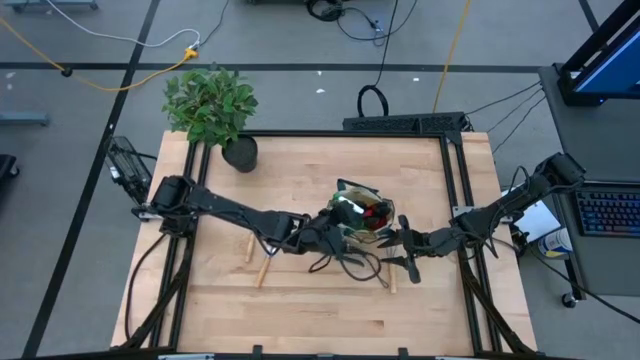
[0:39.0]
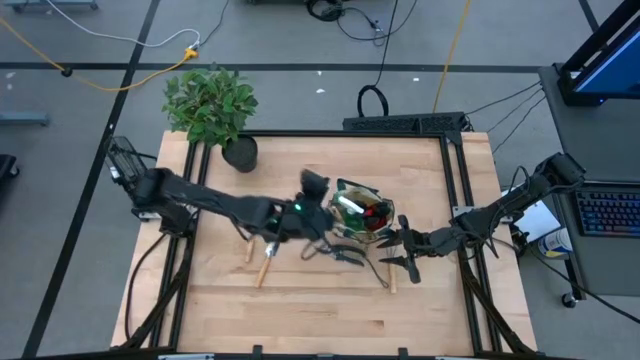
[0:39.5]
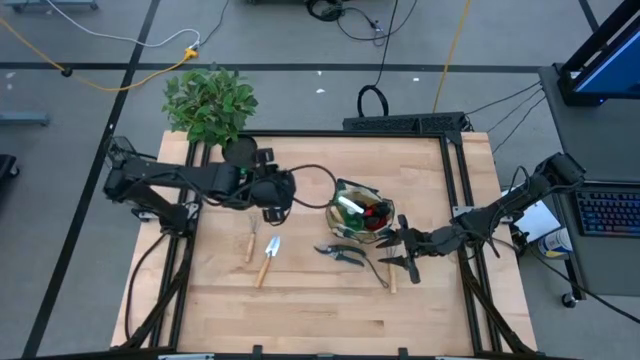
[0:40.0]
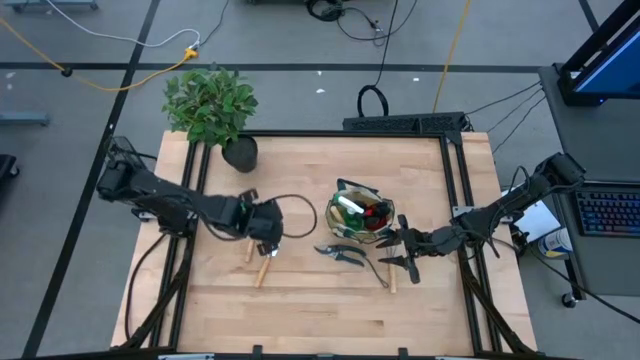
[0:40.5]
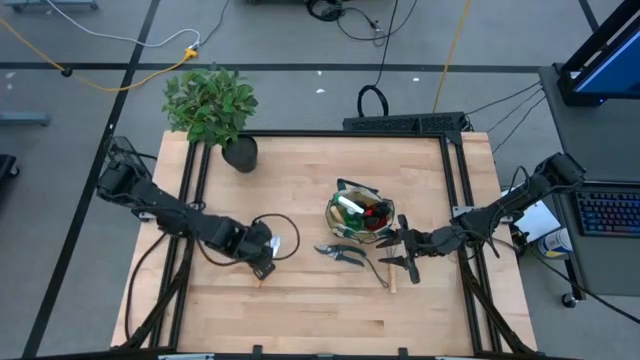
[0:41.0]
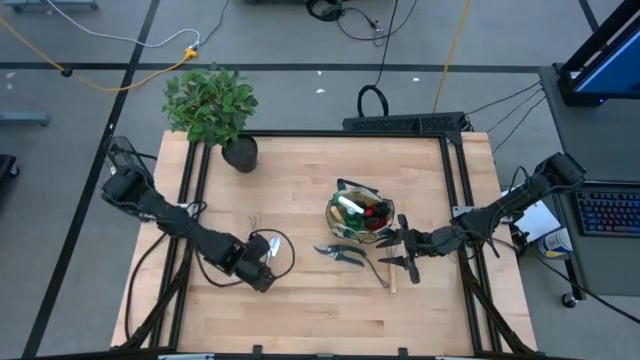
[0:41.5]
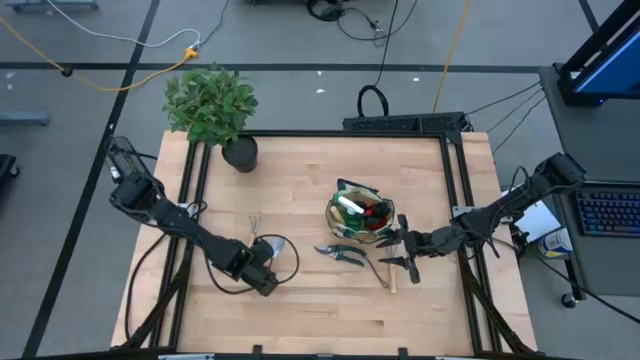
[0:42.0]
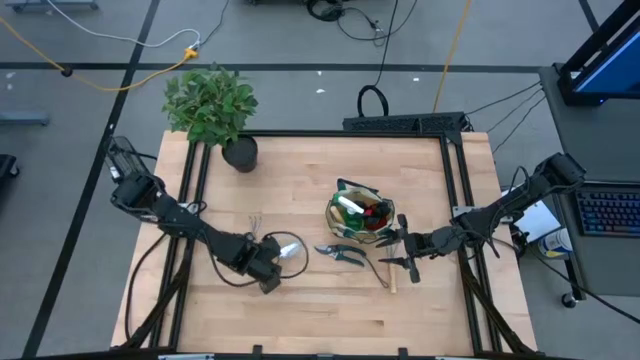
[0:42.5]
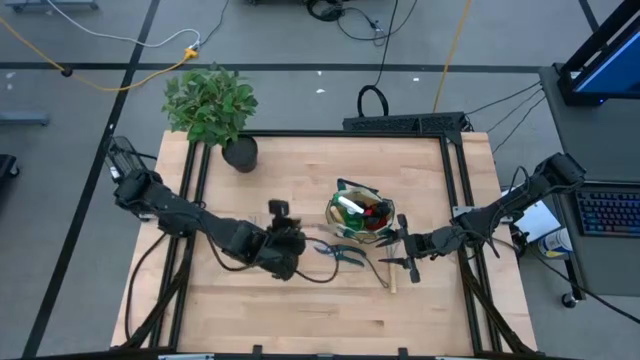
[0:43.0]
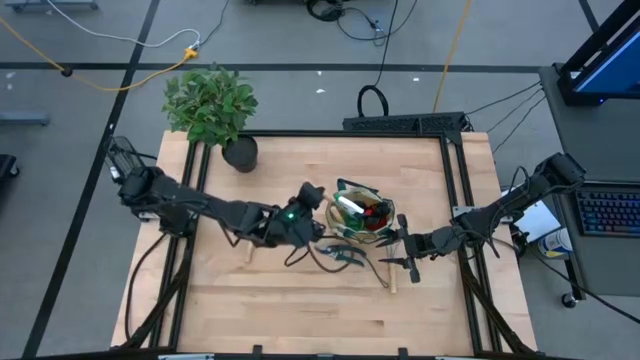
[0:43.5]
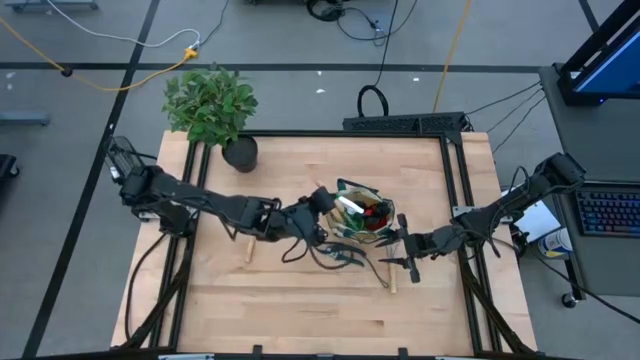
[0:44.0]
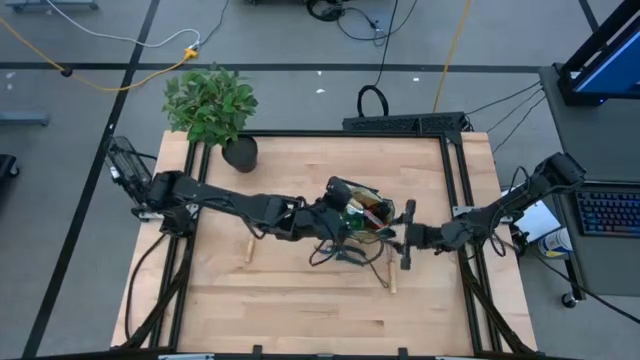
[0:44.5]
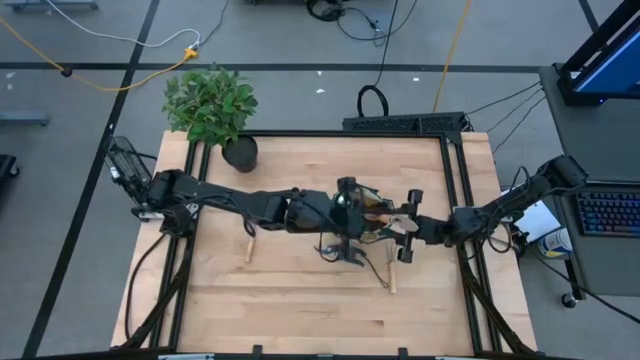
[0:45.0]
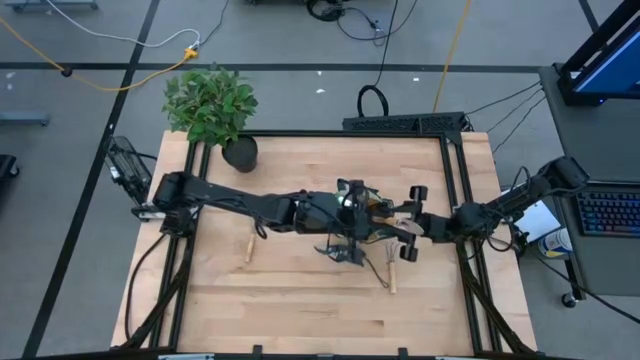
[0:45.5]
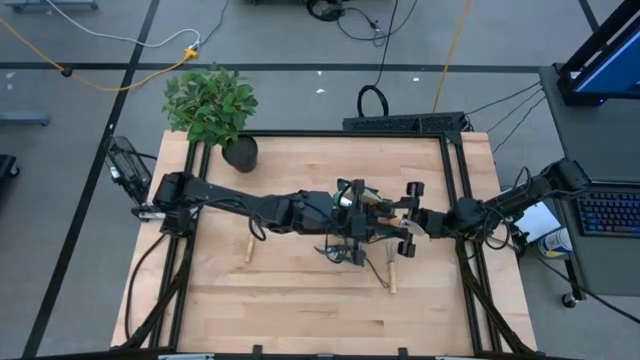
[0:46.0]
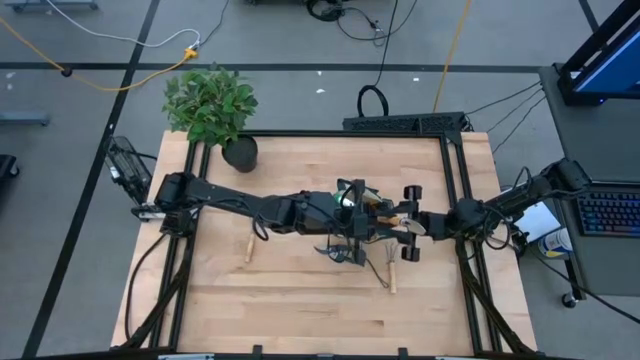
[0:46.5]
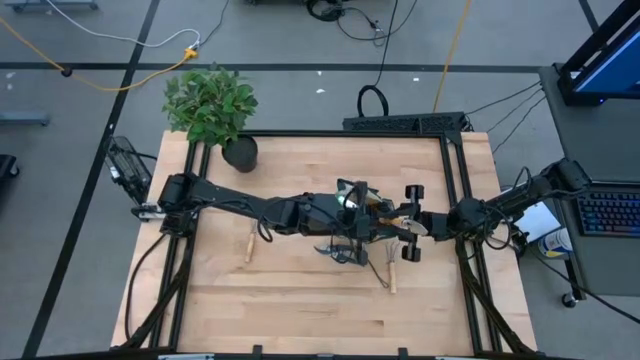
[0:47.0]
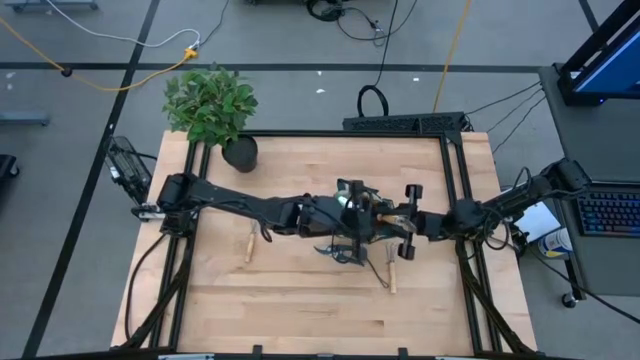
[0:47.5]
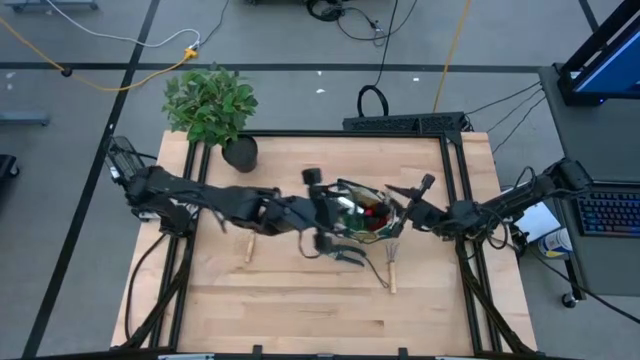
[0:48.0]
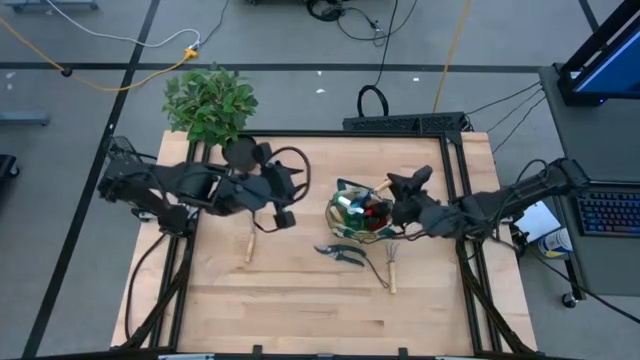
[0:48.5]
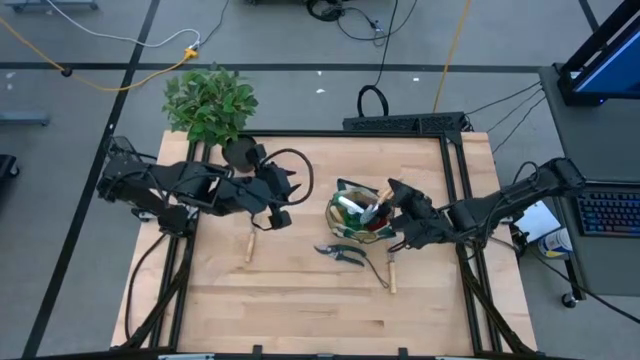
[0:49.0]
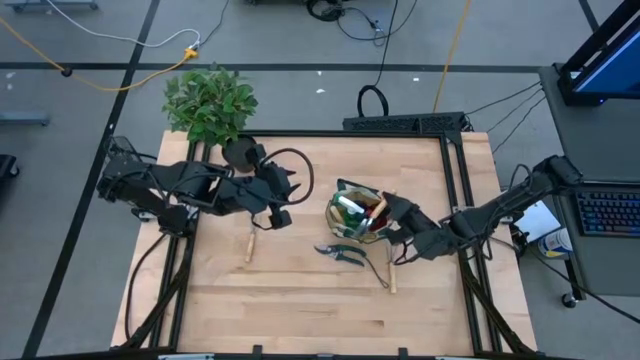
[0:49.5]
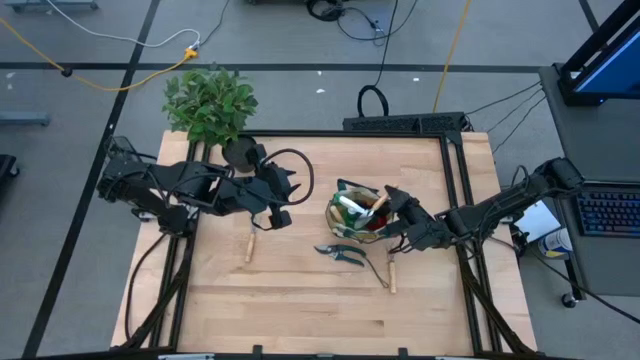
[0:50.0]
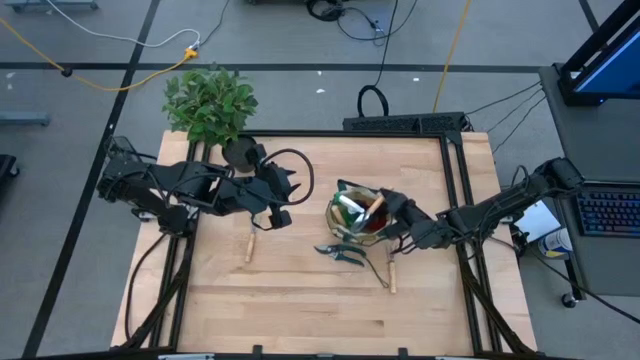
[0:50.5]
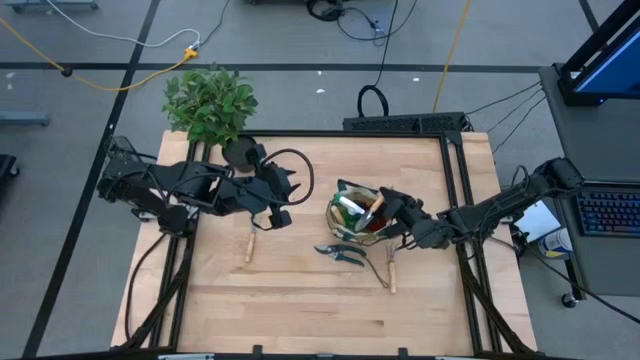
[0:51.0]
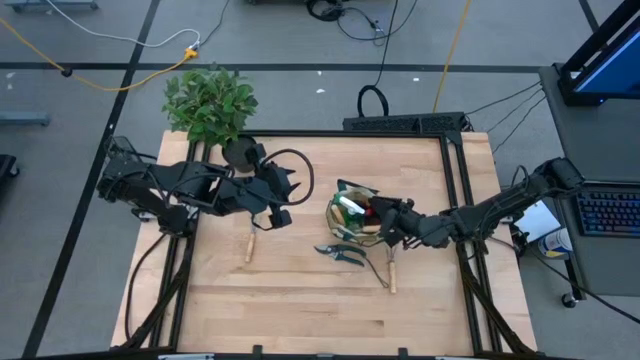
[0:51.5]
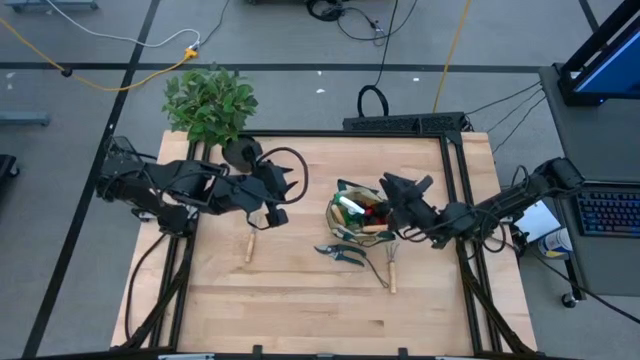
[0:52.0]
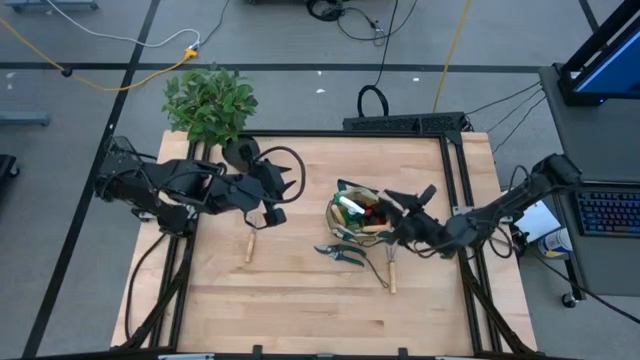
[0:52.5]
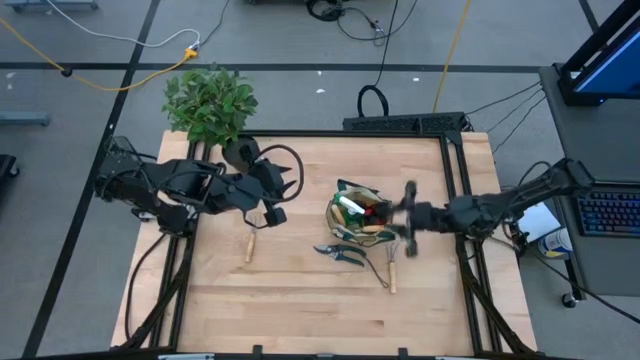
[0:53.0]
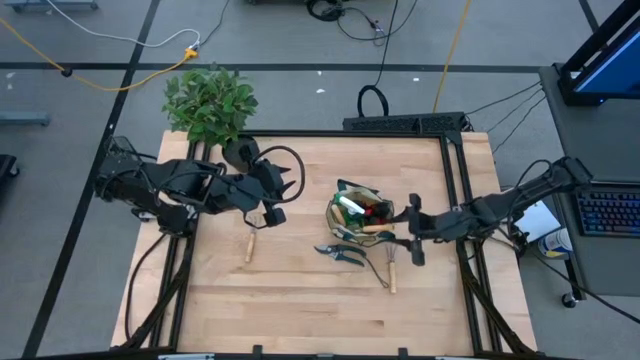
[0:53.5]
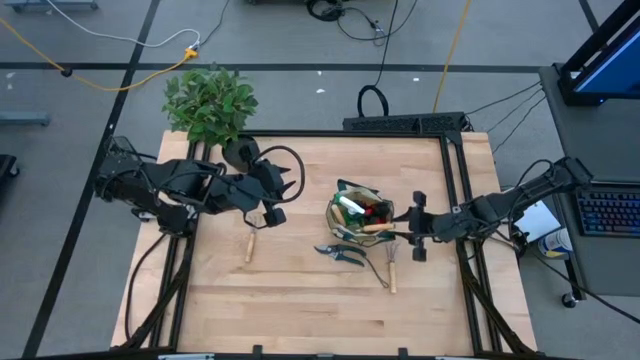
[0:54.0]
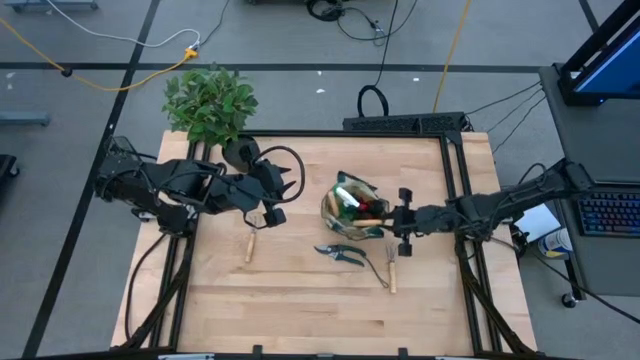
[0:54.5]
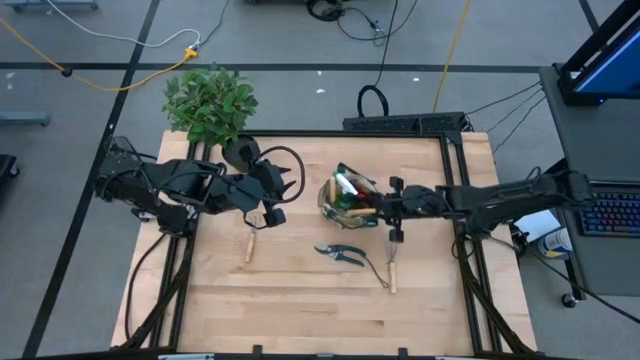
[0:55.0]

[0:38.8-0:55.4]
Task: Pick & Place Garden tools in Gardening bag
Put the trowel into the gardening bag

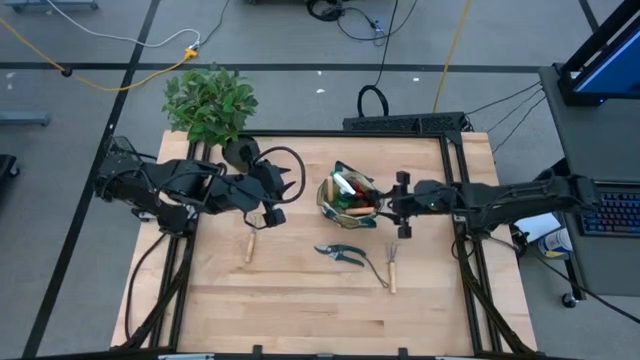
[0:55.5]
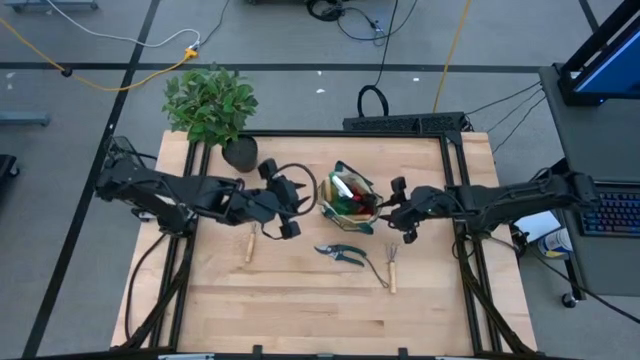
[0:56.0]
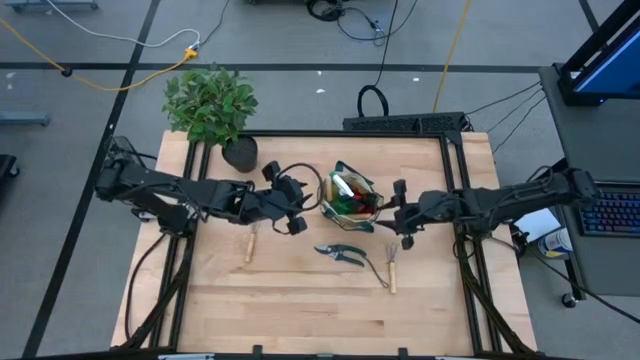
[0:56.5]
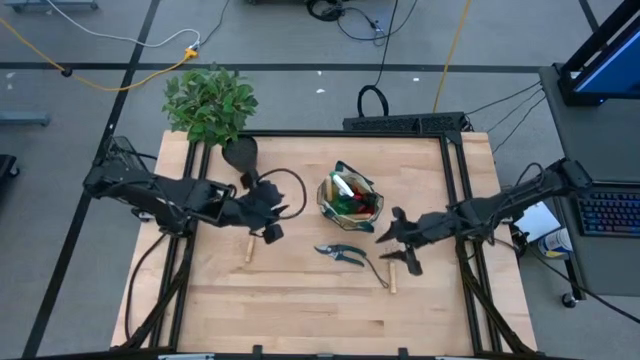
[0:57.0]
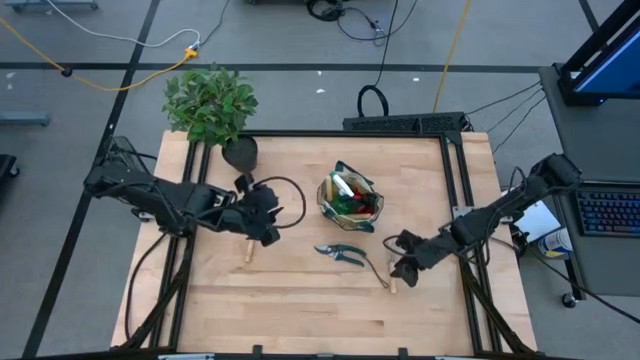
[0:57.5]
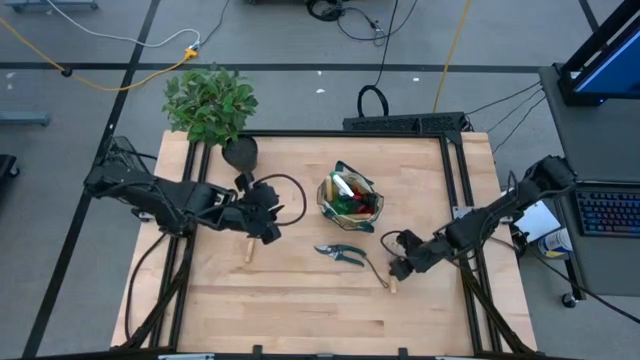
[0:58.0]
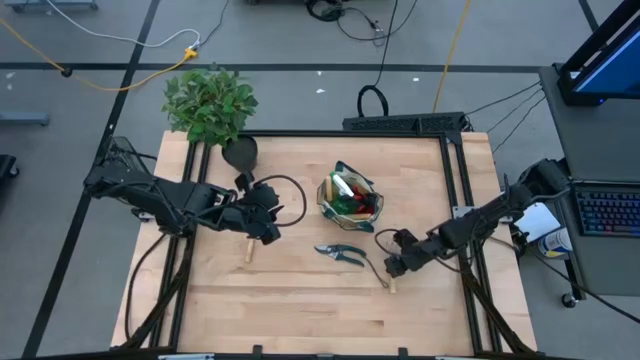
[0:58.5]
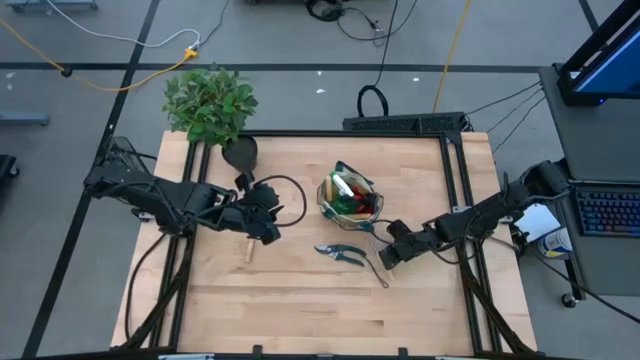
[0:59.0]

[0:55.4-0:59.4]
Put the right hand rake into the gardening bag

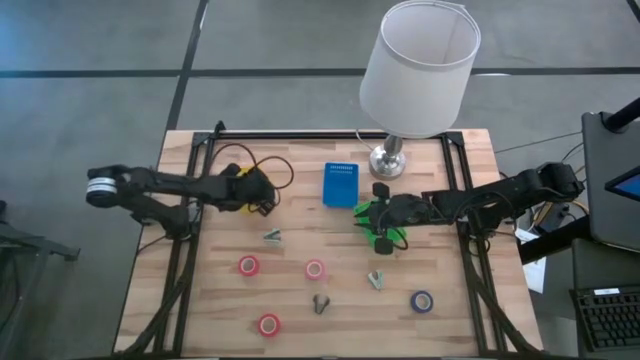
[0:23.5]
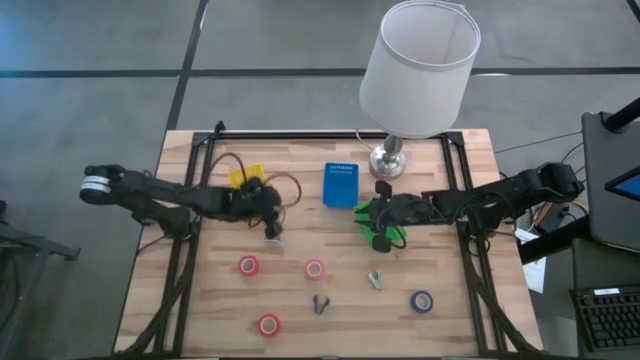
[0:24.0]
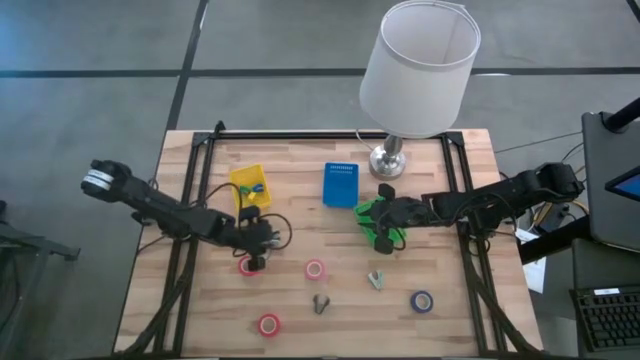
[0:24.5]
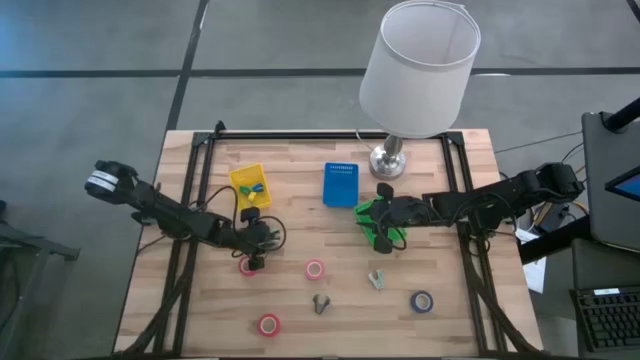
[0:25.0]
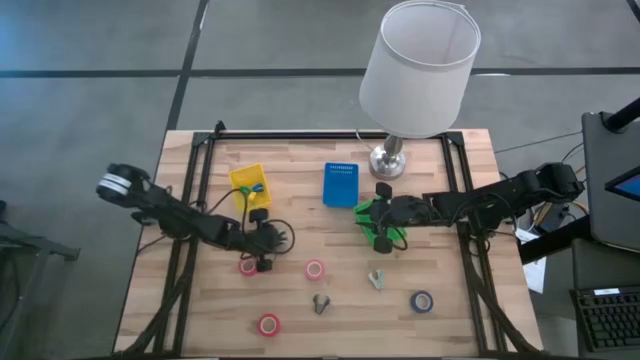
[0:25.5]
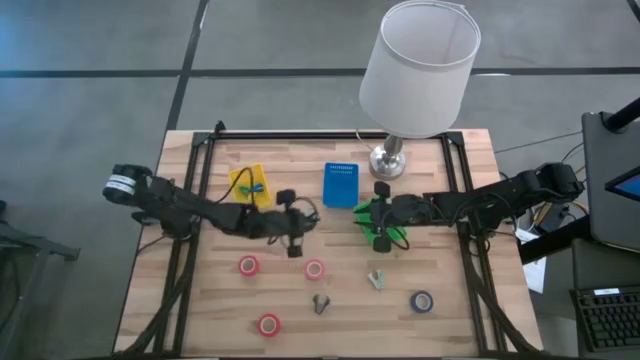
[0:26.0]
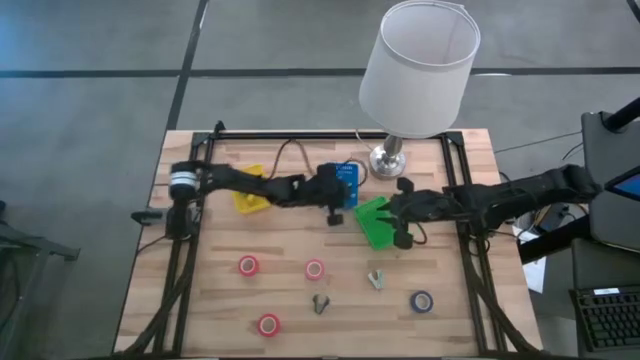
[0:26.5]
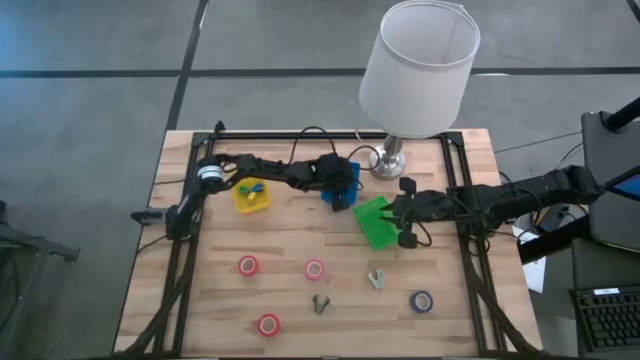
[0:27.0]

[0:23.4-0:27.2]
Task: Pick and place Stapler, Stapler remover, tape
Put the left light blue staple remover into the blue basket
